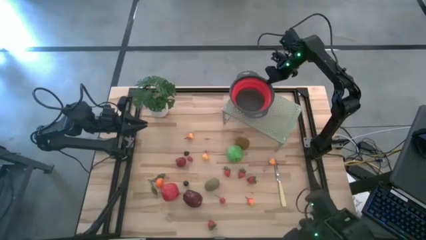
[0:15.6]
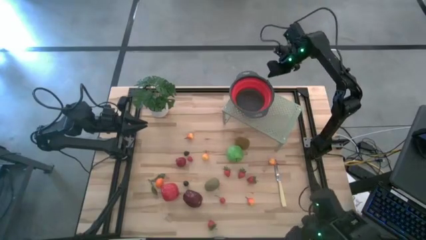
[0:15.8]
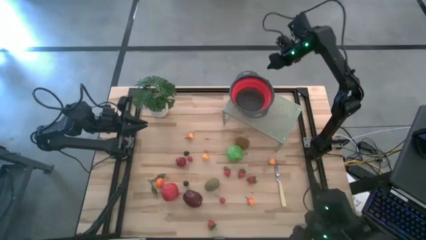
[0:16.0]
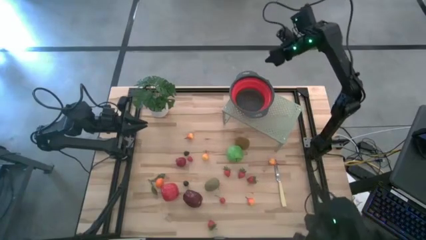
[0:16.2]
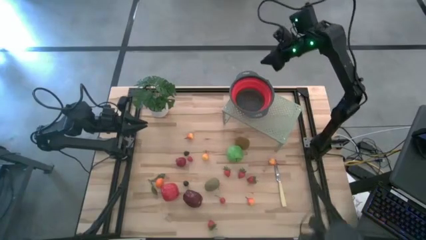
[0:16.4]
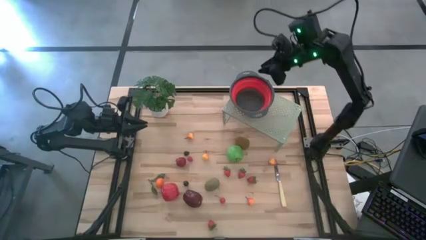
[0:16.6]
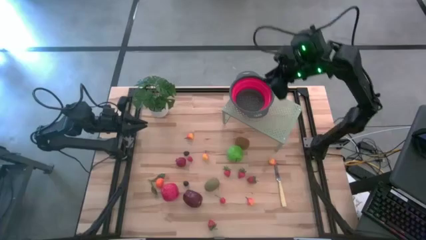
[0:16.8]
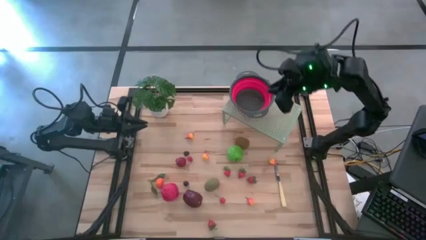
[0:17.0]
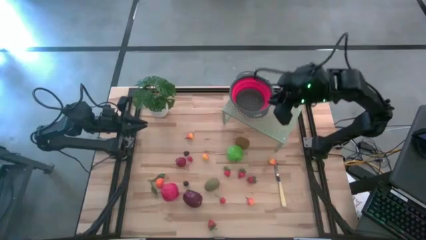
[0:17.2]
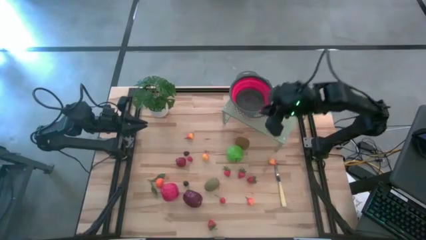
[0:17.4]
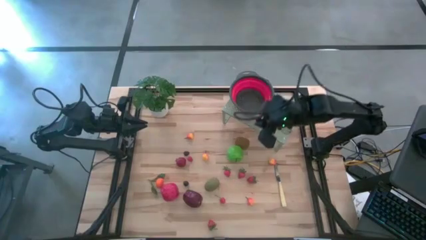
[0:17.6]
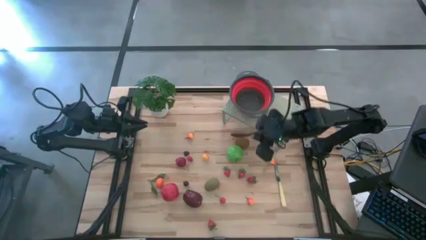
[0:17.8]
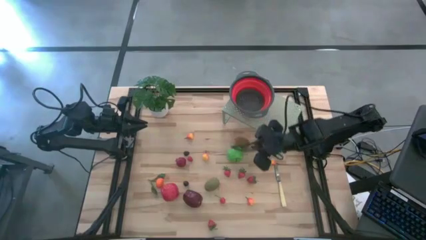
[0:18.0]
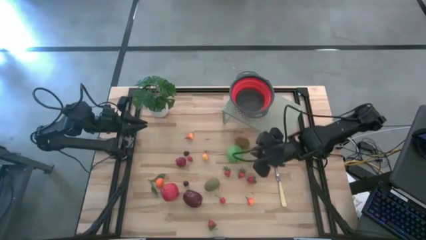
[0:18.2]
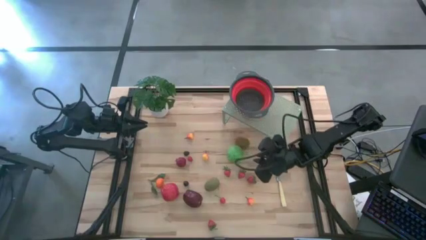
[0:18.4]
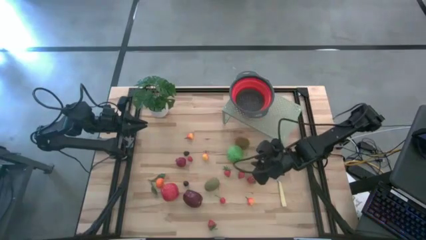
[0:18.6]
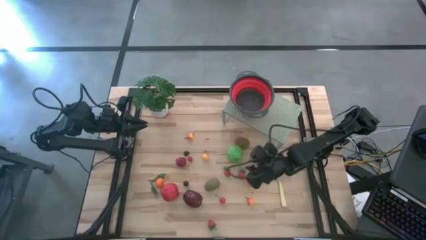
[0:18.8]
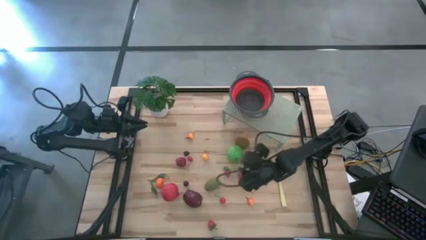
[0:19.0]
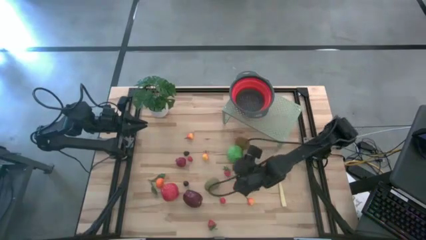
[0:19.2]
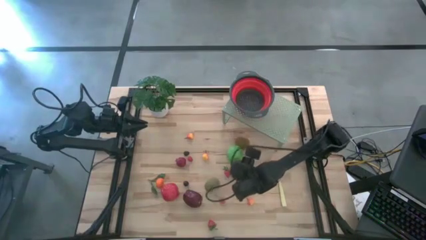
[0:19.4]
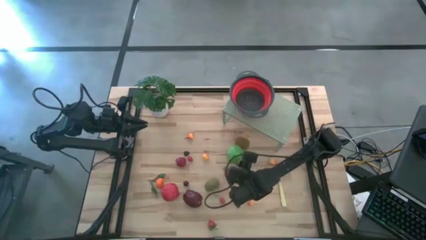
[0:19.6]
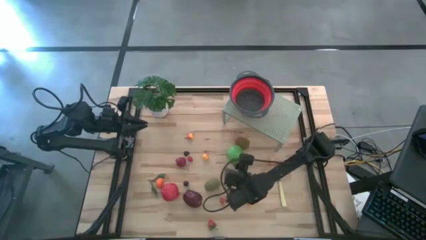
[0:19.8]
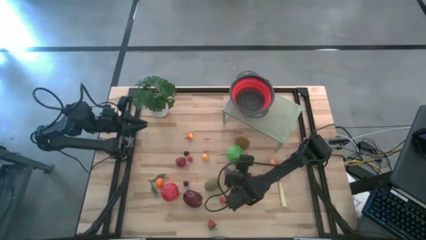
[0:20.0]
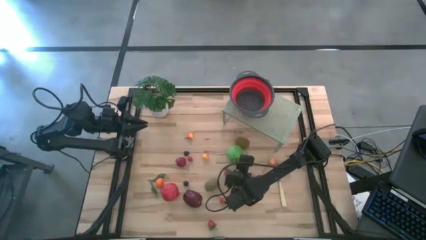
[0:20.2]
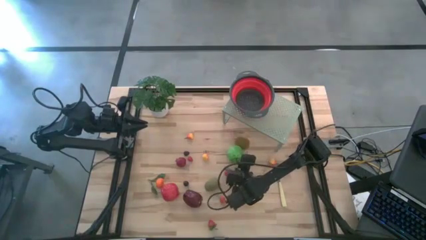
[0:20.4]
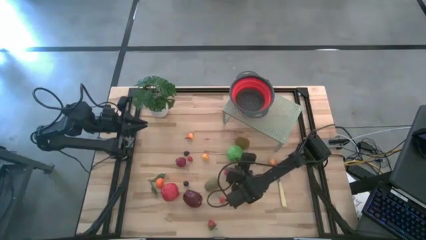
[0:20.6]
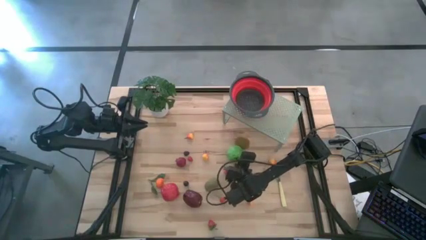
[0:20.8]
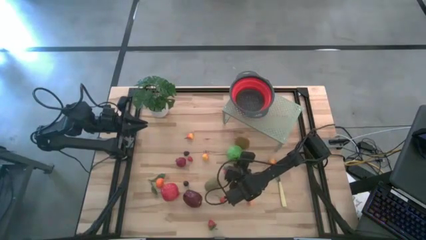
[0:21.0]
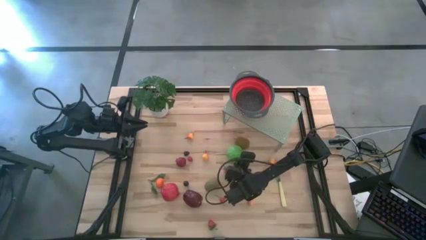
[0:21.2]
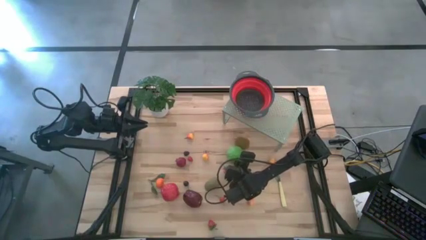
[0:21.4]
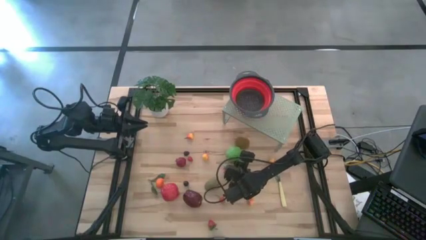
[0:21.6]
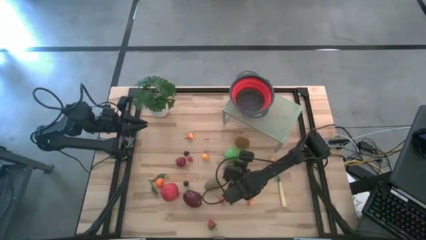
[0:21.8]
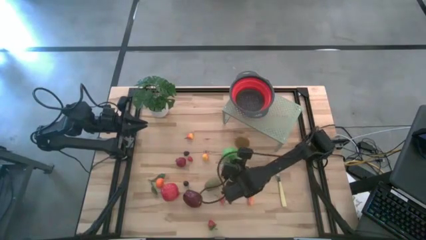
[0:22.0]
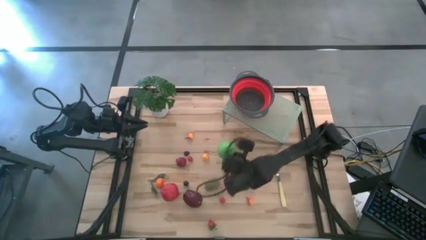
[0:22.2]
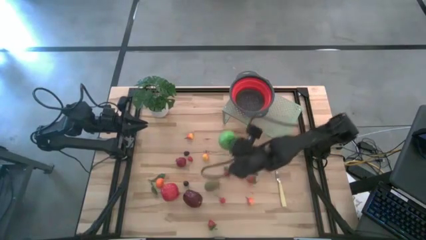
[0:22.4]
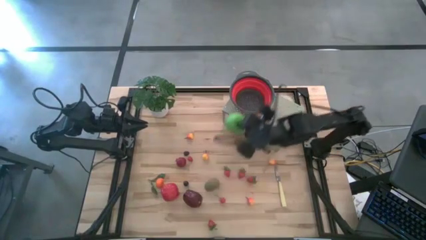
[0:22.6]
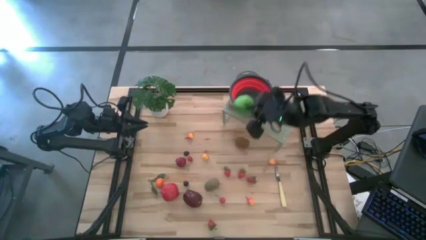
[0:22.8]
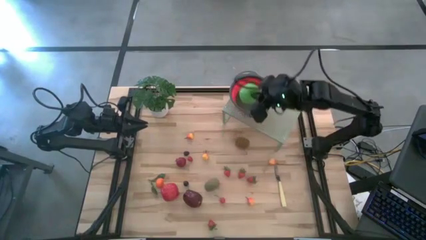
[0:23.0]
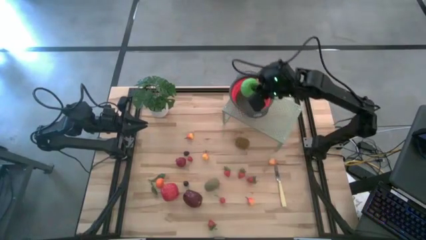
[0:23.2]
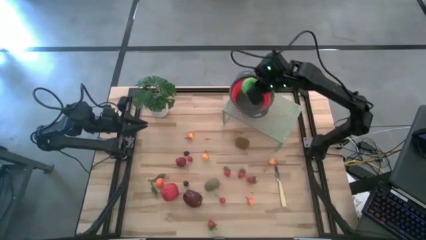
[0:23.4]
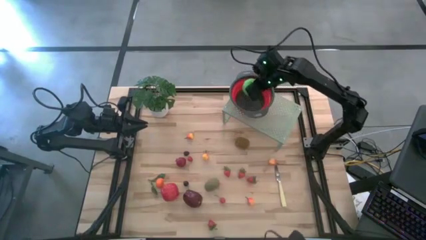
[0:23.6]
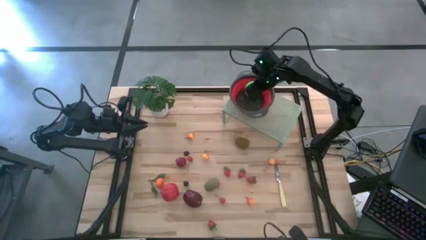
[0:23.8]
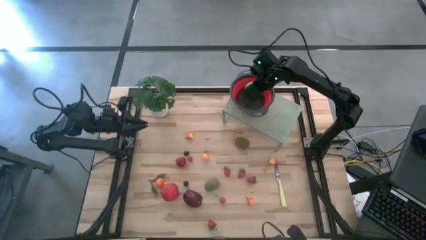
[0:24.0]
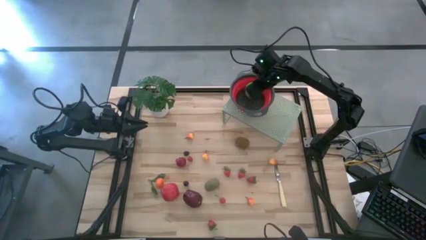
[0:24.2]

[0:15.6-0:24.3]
Task: Pick & Place Fruit
Put the green apple into the red strainer bowl

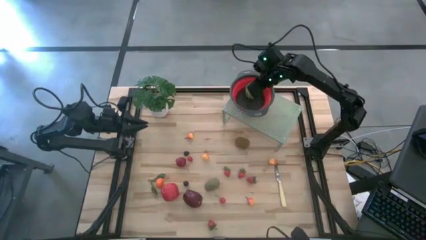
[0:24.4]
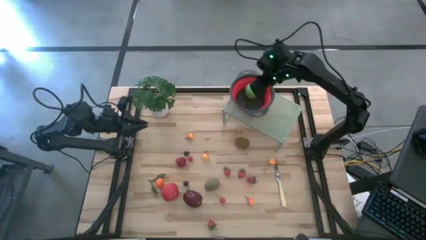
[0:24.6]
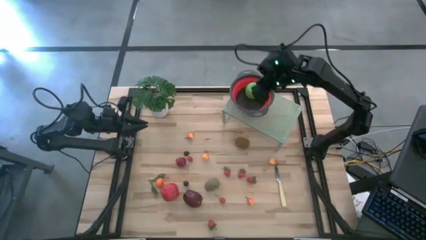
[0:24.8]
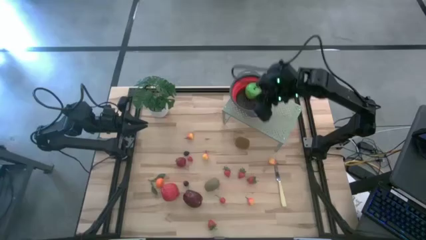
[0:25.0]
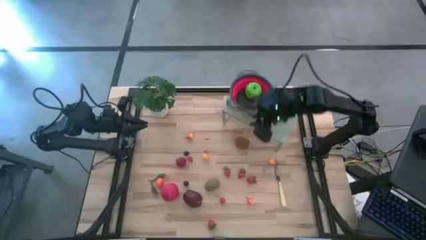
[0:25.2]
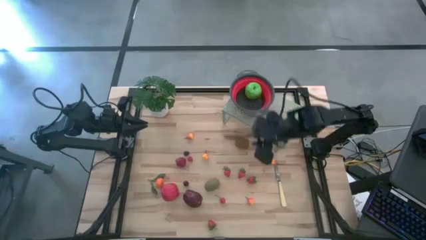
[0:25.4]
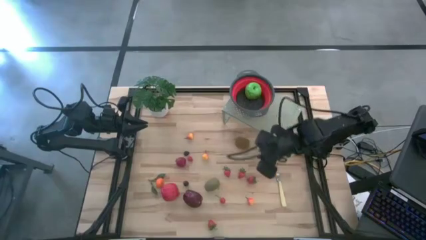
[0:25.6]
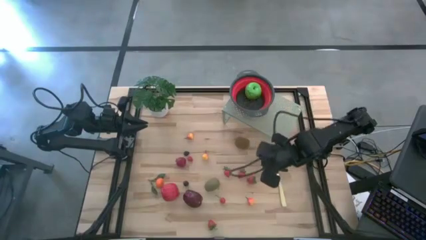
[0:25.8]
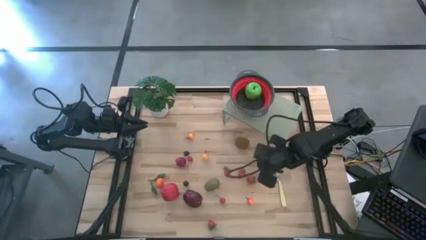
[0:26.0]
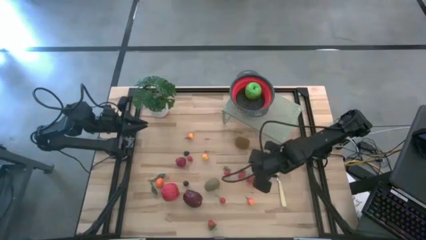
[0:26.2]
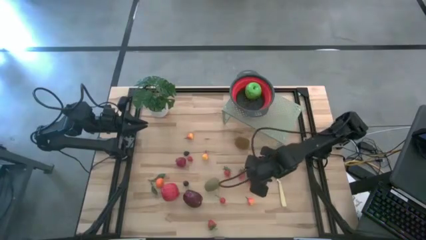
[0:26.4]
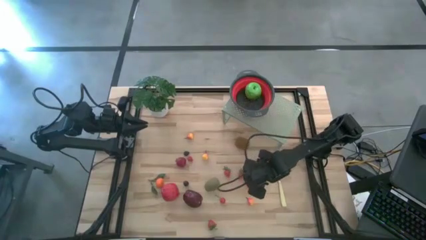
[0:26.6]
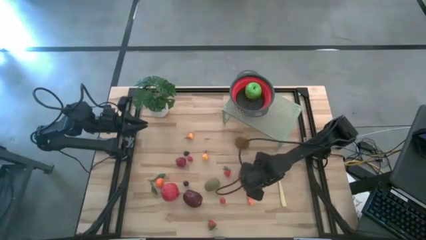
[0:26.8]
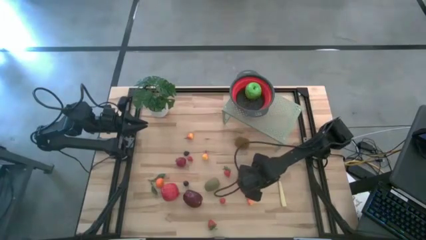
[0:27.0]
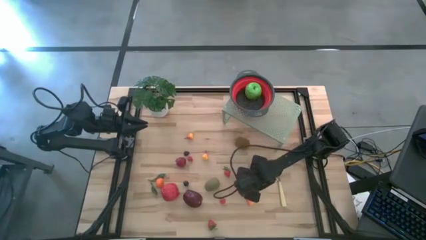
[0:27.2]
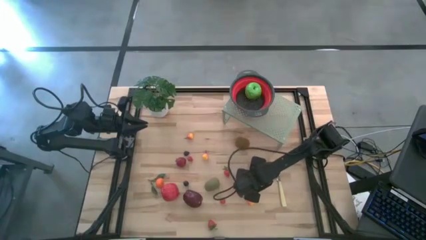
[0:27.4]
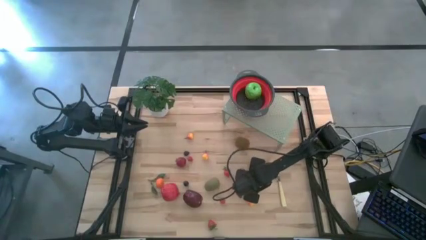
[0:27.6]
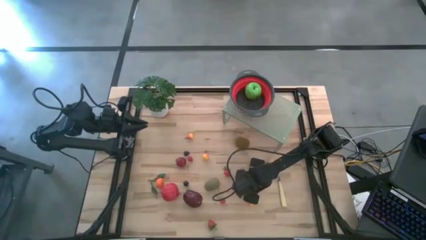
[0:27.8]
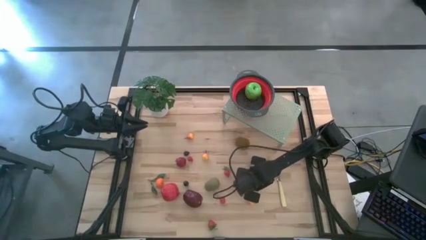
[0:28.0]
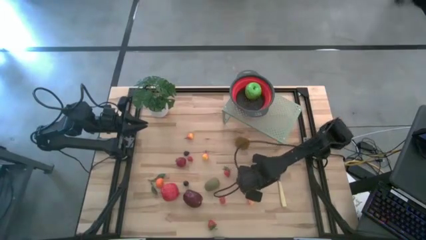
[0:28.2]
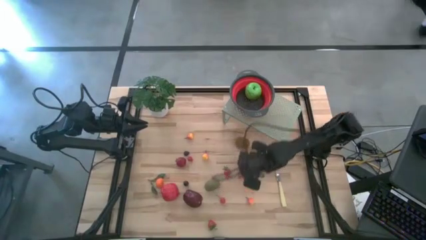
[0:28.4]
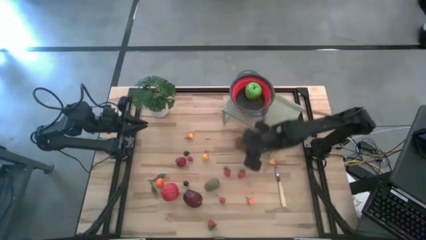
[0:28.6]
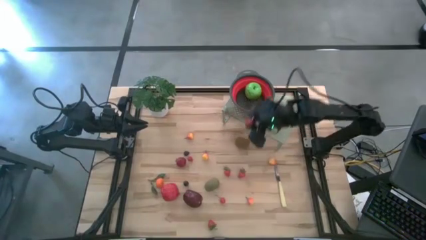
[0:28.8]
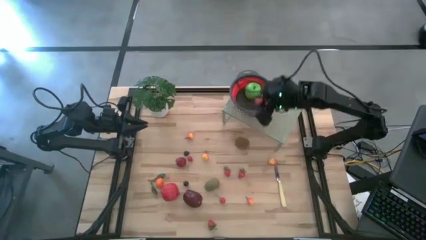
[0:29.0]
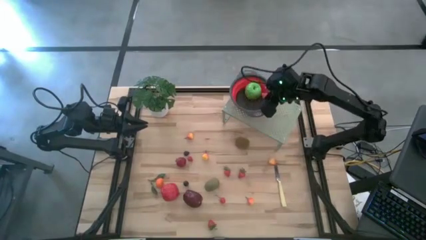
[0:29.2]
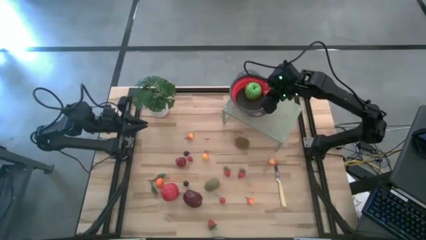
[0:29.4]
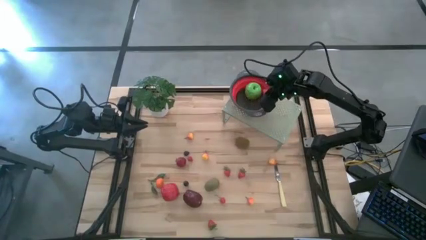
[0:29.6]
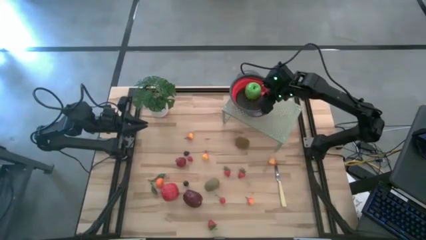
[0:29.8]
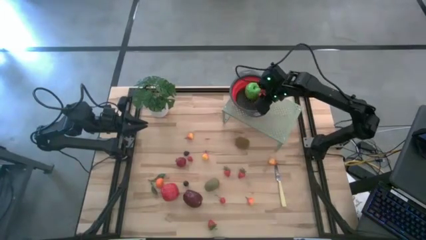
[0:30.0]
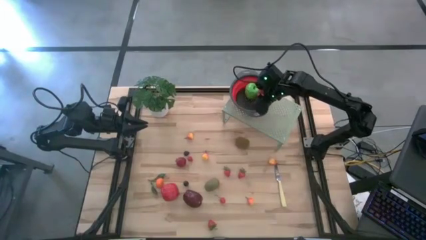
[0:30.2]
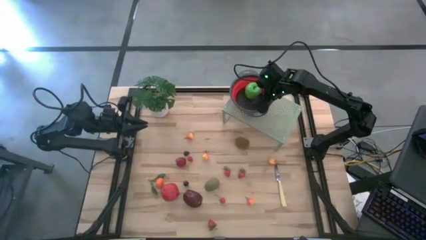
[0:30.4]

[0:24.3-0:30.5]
Put the red strawberry into the red strainer bowl
